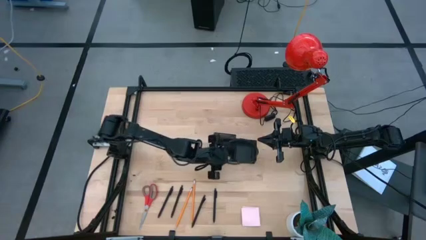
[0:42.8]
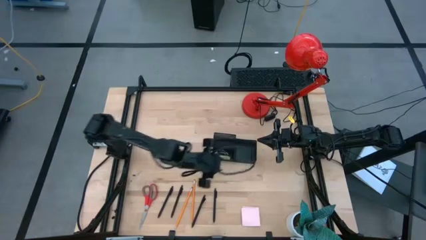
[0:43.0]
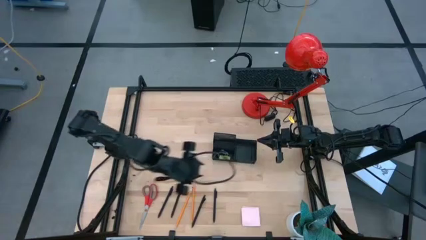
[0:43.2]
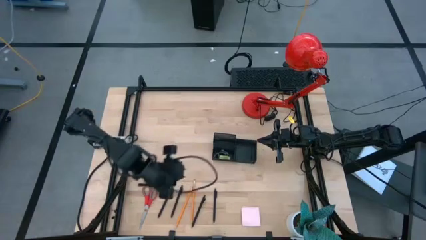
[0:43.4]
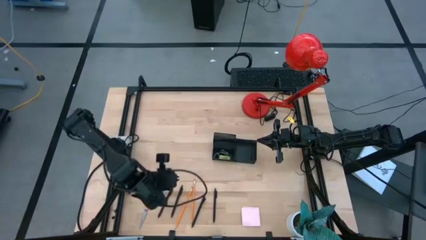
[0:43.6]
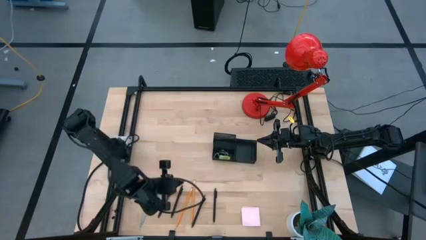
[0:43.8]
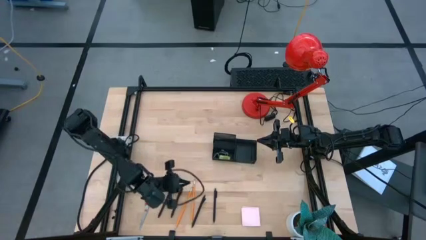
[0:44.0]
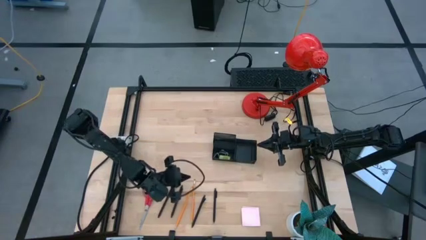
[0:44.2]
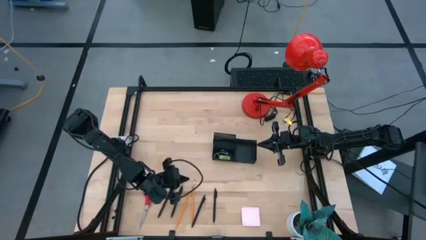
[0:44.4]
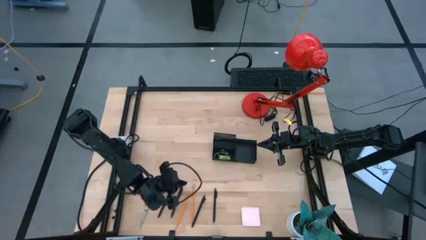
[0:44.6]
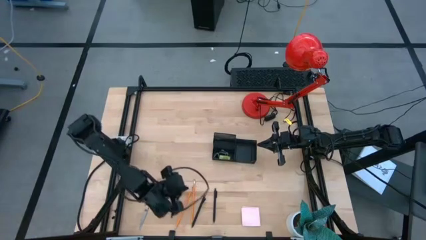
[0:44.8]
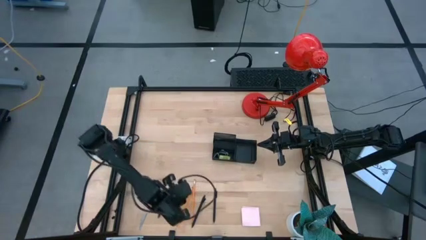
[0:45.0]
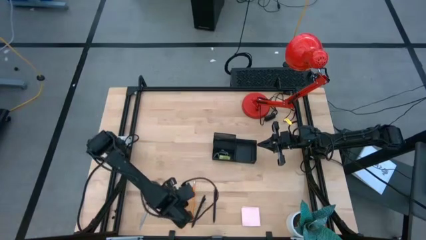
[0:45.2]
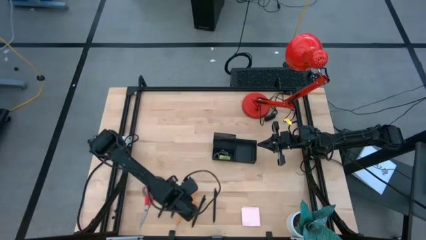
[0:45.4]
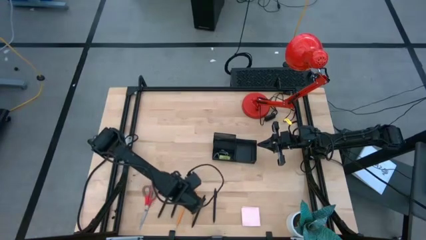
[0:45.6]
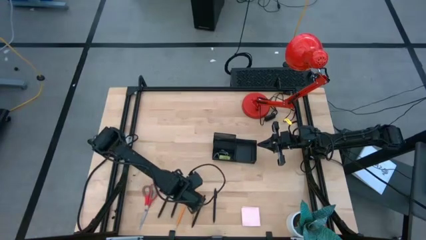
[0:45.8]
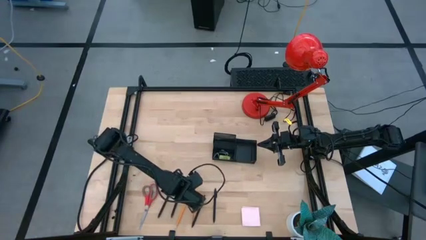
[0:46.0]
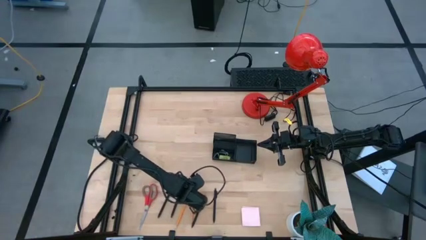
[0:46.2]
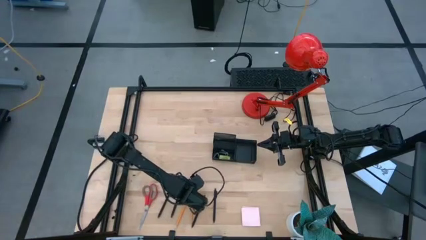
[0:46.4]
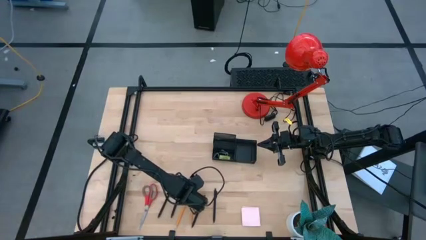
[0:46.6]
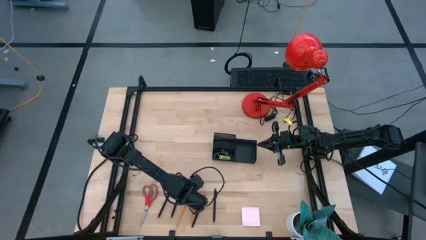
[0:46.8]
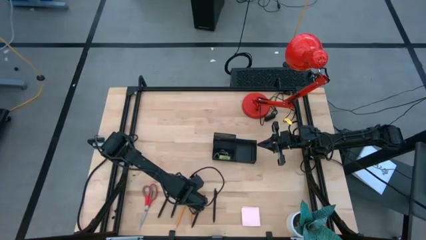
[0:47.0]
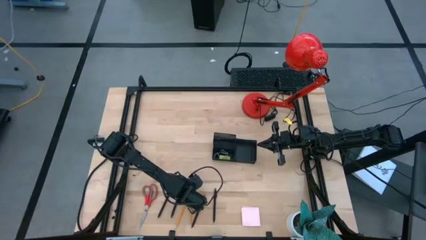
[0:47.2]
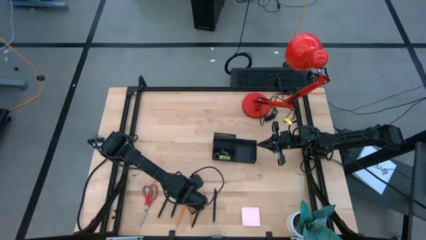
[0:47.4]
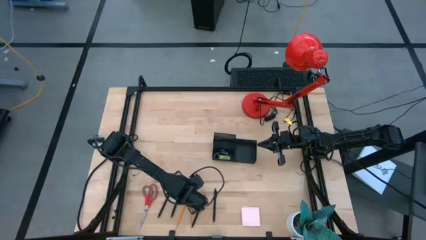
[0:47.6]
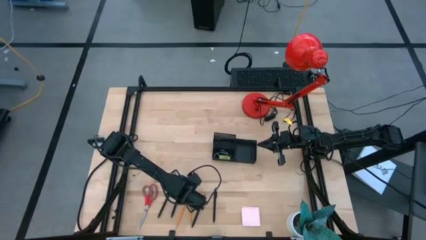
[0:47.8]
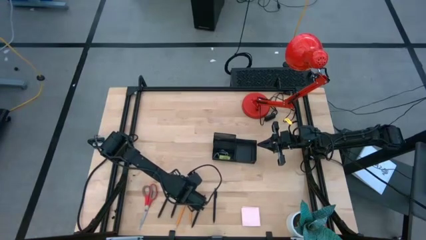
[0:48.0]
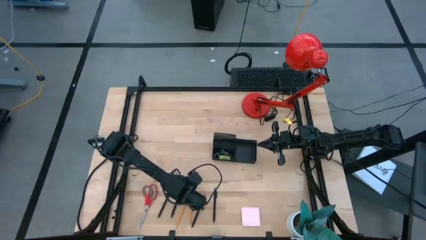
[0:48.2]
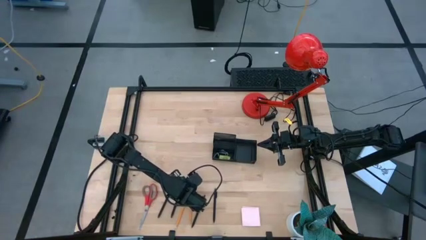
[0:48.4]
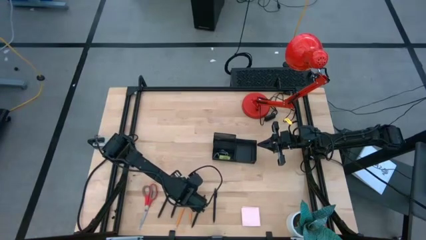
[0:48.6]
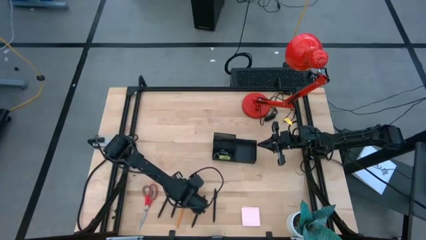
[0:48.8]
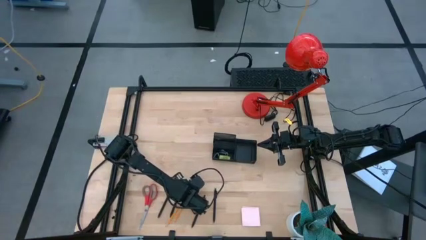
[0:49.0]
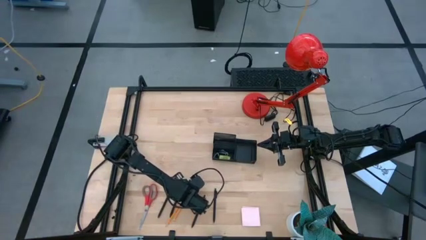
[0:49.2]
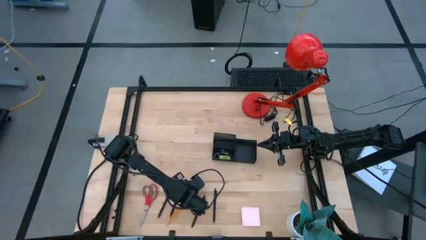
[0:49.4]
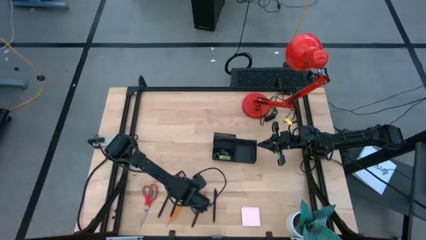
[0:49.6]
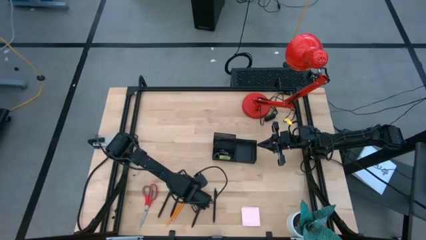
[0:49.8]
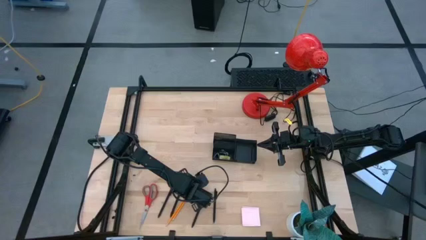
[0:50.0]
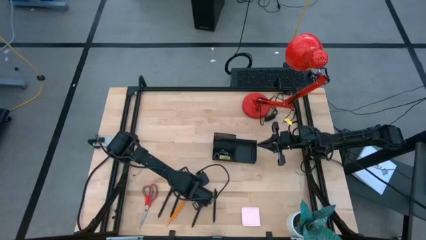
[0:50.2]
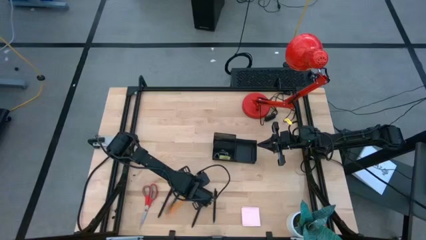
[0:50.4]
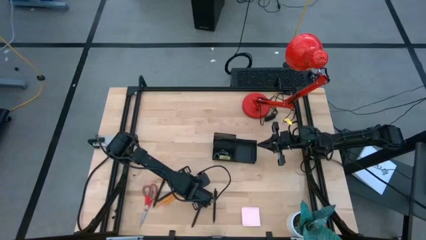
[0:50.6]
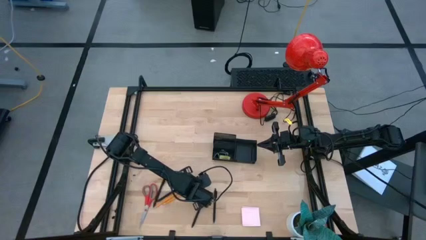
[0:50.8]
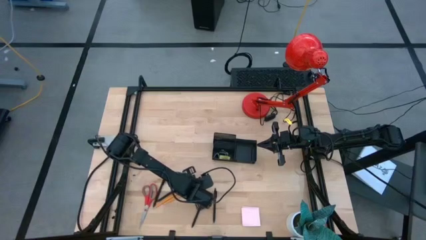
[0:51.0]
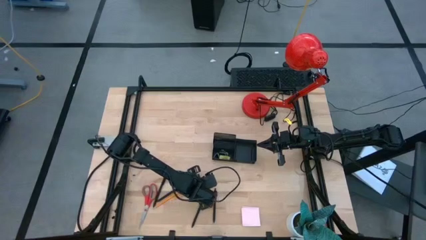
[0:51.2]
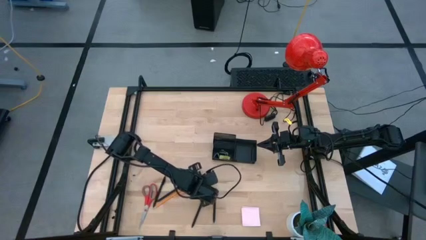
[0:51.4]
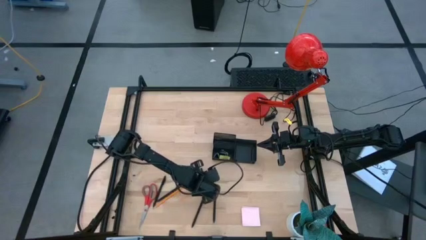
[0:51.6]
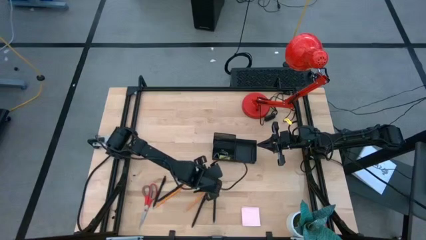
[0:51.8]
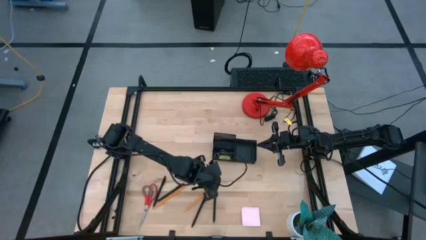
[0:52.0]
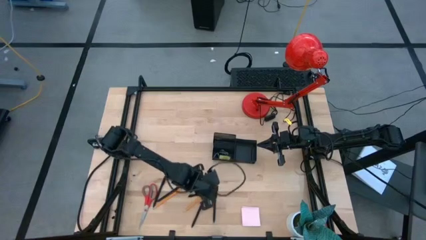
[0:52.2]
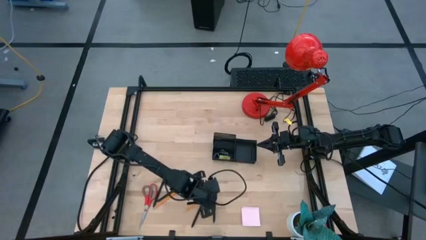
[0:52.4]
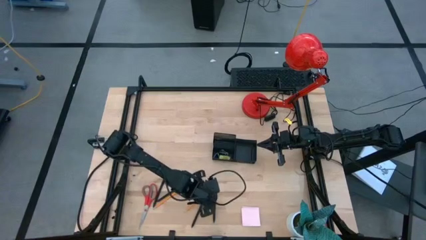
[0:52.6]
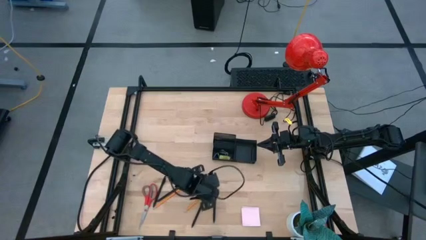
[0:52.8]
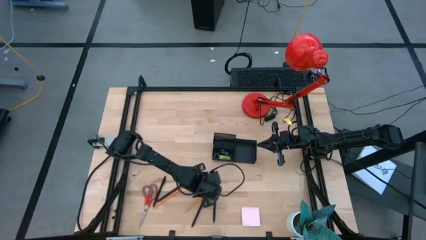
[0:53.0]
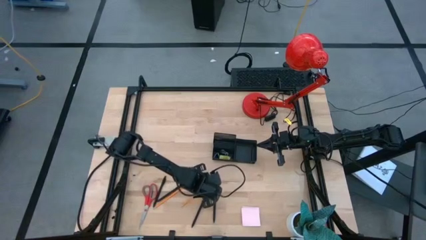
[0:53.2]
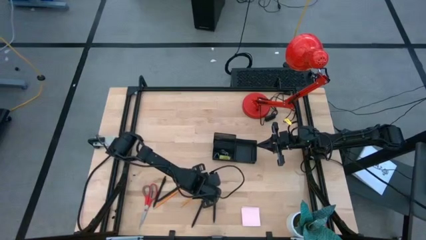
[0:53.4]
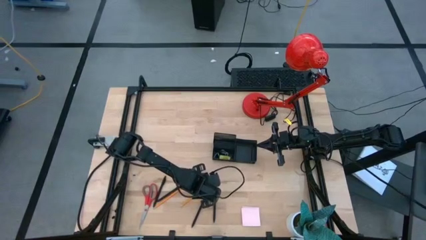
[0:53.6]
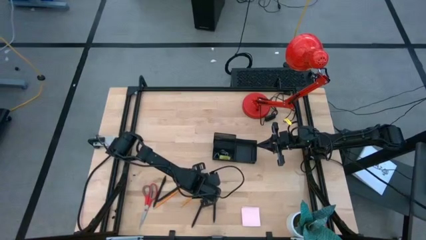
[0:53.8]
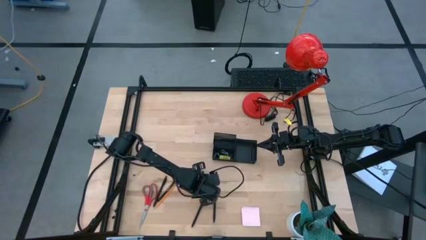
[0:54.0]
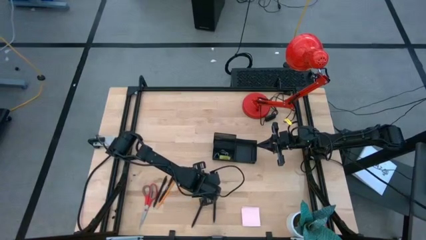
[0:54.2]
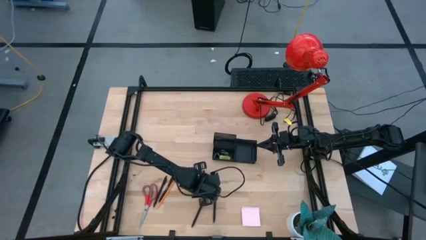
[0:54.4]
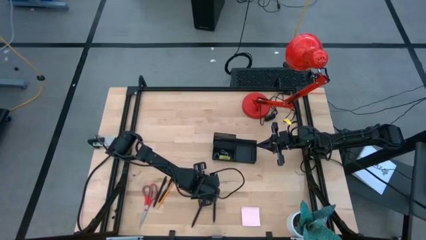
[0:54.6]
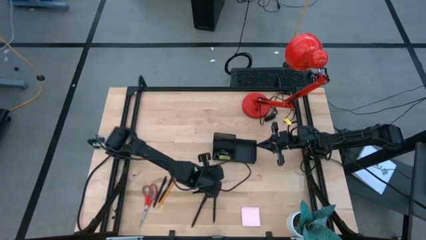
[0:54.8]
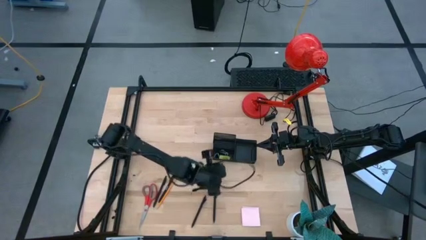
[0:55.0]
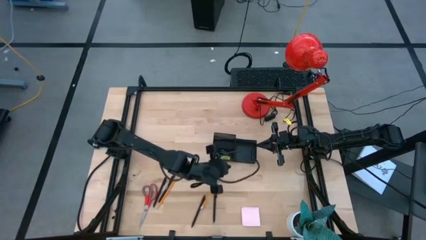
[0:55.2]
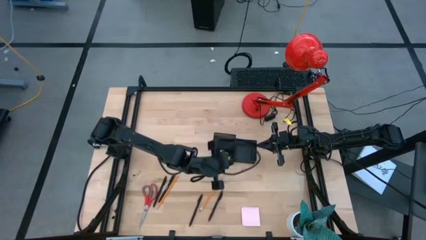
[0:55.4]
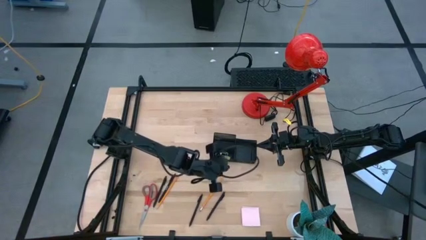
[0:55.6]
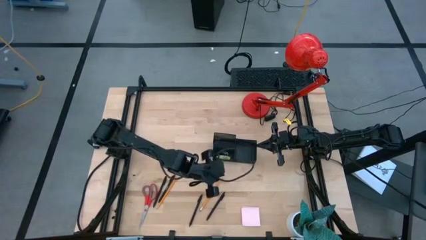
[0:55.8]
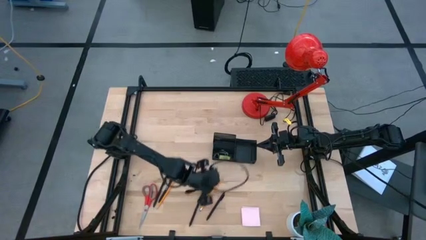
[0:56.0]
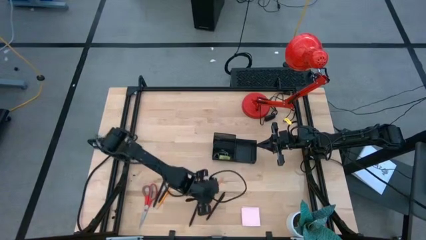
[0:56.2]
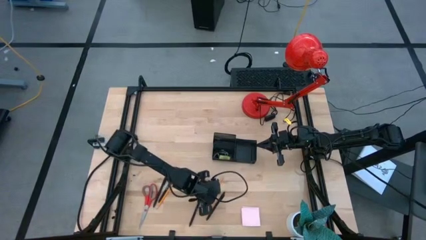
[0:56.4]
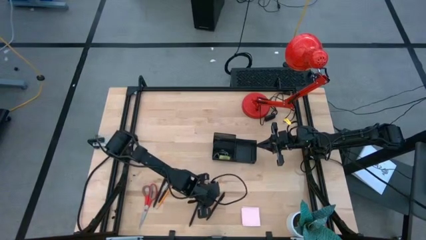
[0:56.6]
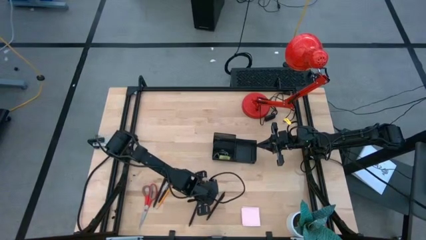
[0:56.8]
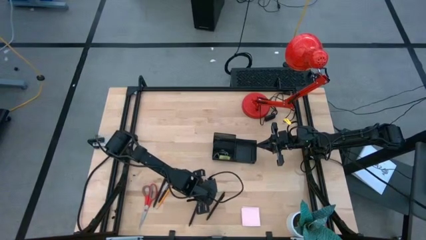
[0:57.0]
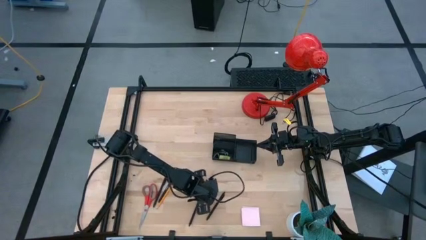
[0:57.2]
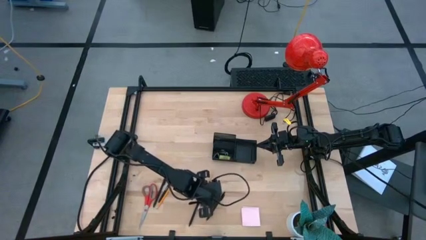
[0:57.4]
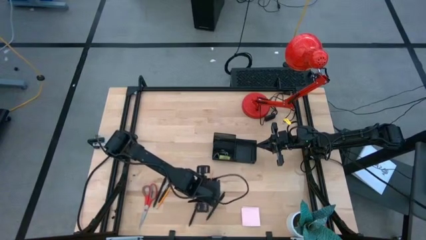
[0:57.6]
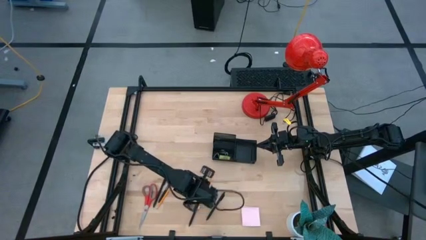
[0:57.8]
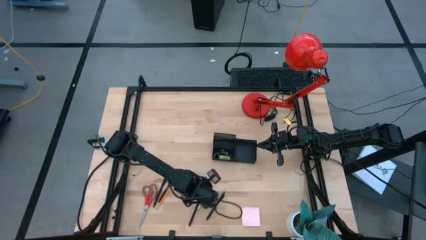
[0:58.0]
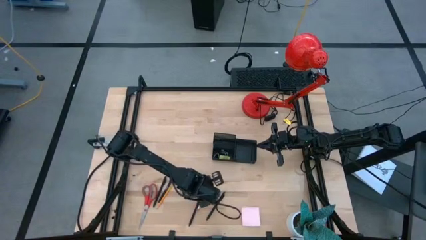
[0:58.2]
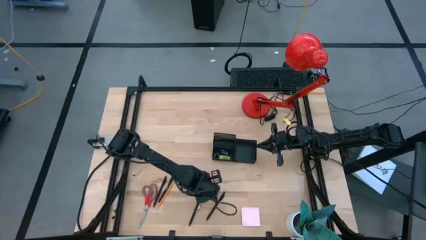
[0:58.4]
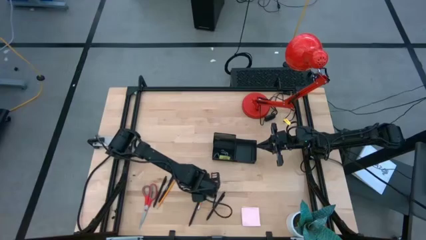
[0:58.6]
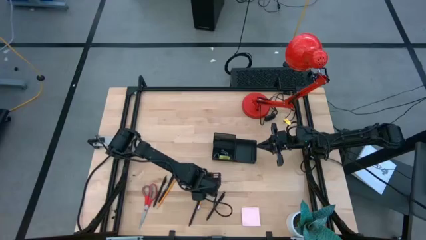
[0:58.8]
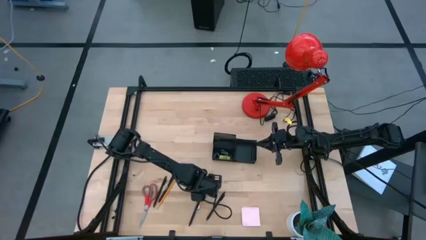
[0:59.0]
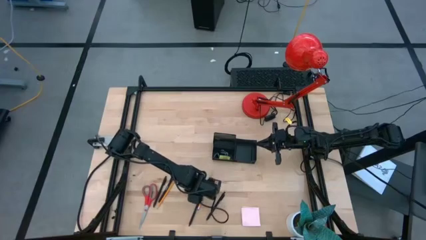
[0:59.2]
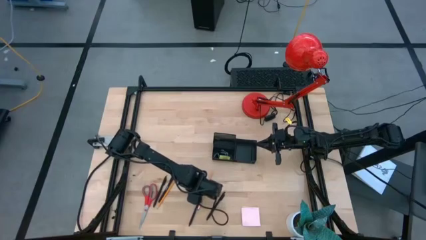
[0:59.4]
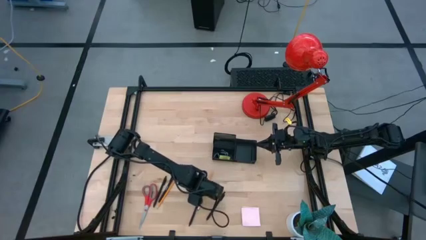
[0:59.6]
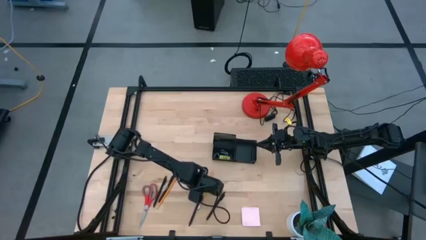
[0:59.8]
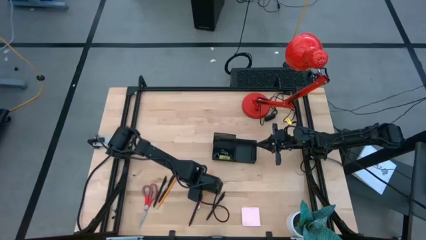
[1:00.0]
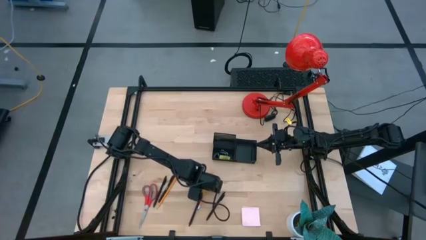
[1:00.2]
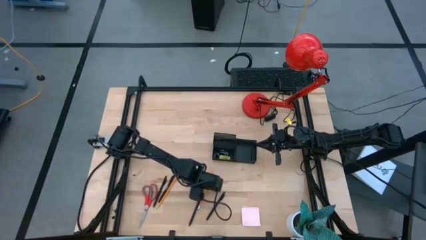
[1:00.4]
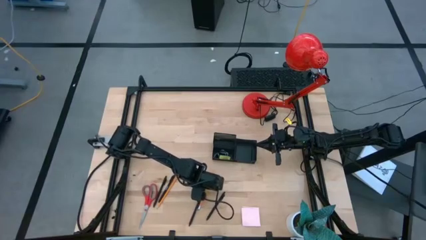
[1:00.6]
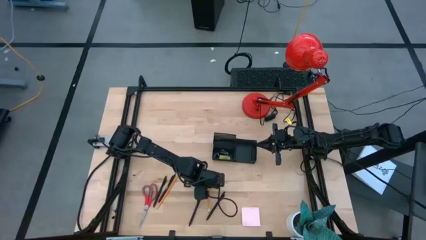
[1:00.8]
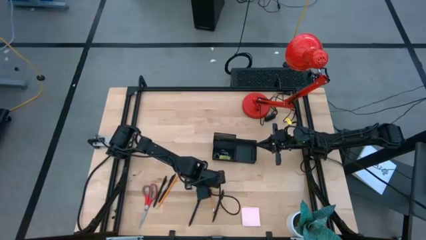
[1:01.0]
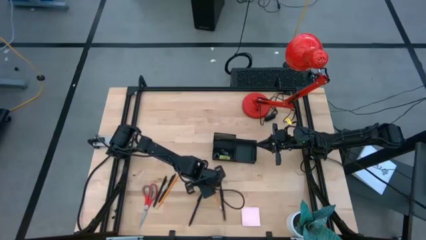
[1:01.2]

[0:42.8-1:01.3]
Task: Pick and place office supplies into organizer
Put the left yellow pencil into the black desk organizer
